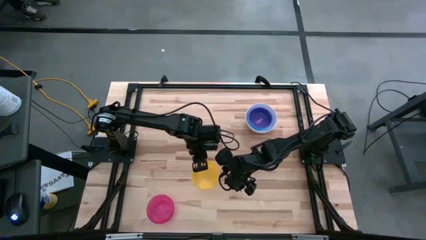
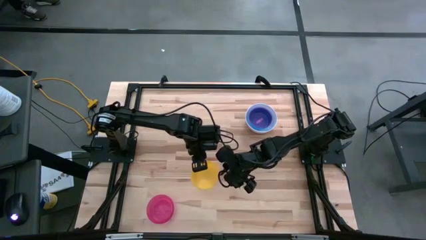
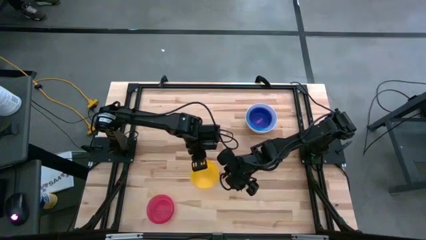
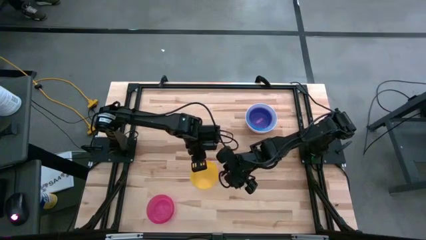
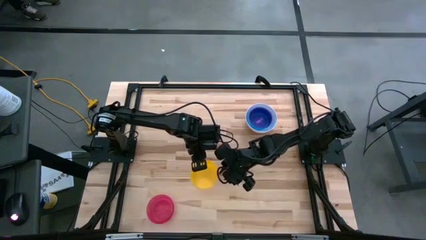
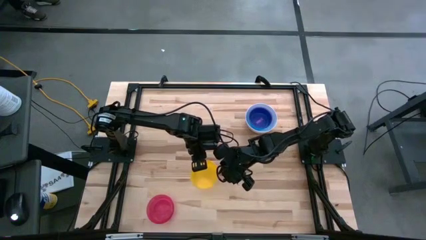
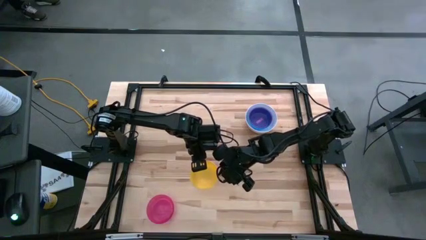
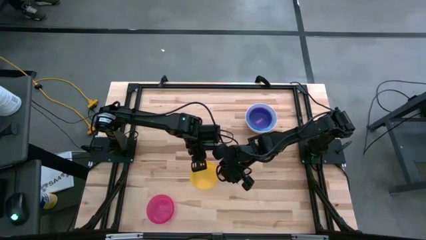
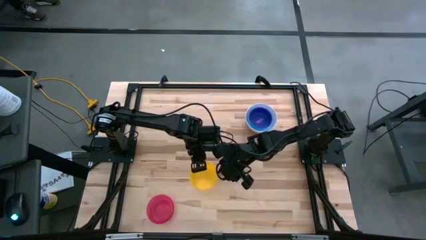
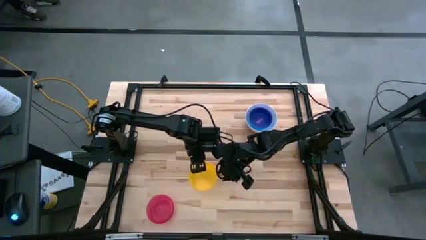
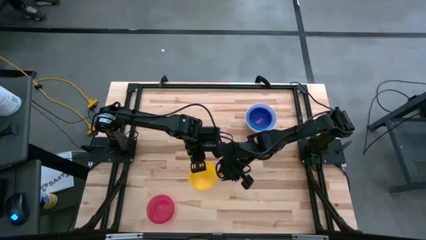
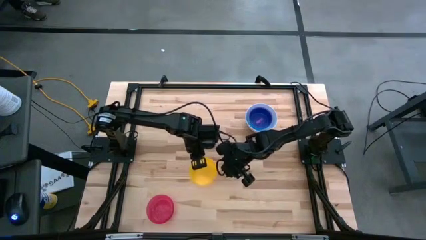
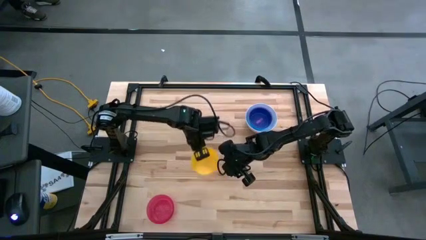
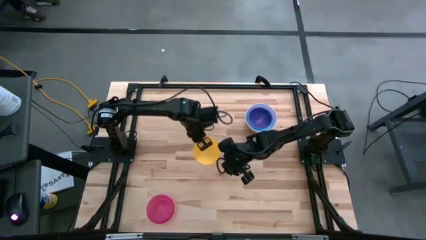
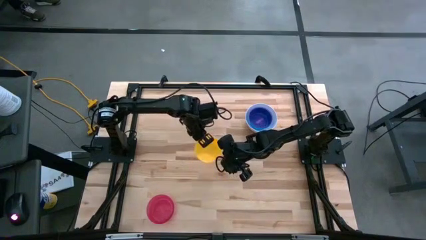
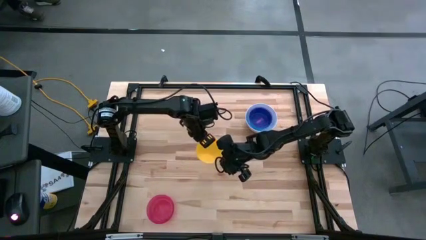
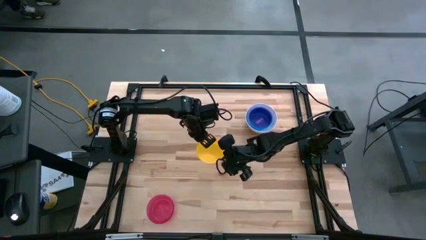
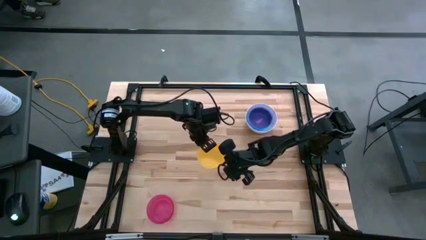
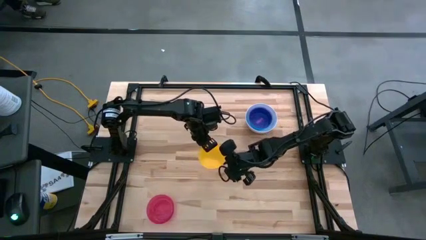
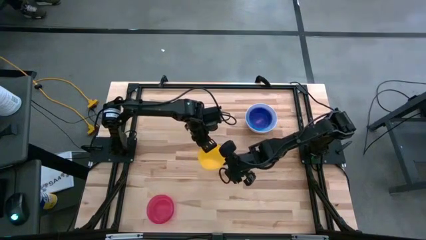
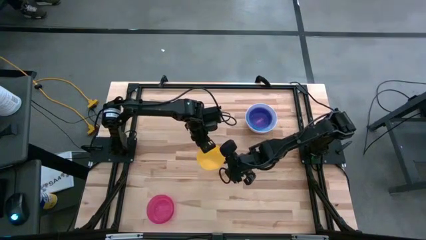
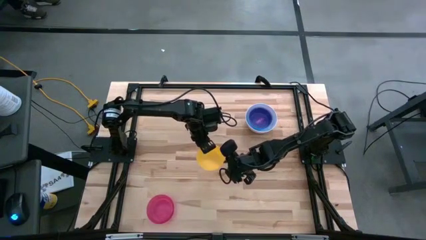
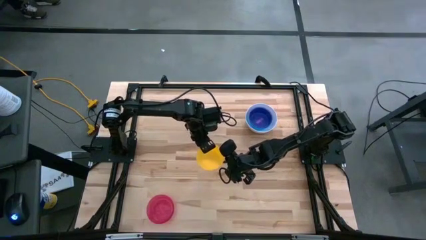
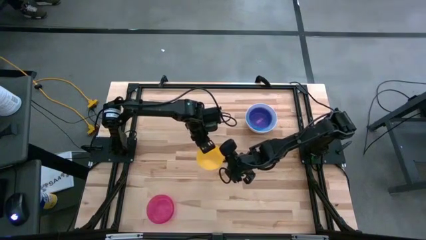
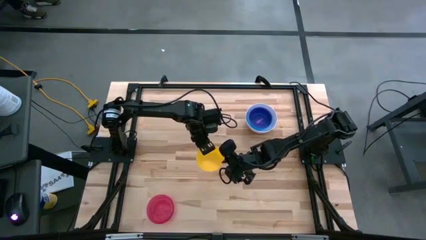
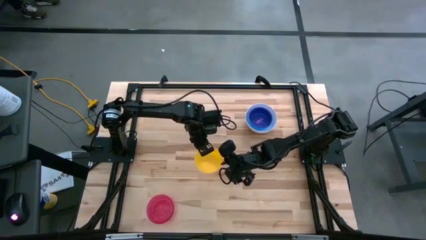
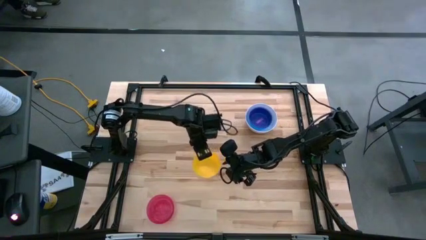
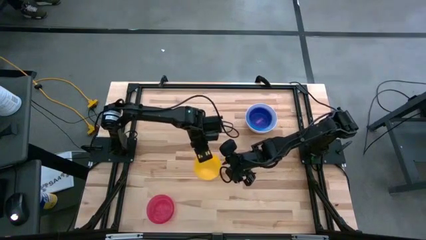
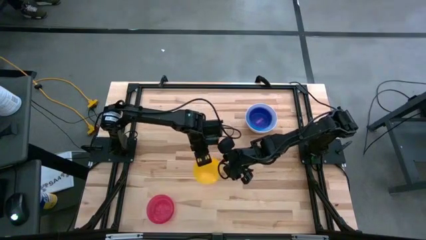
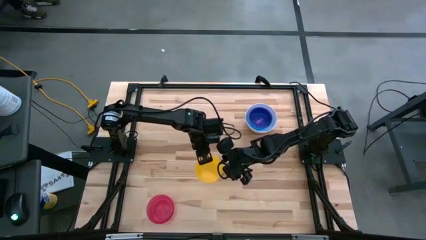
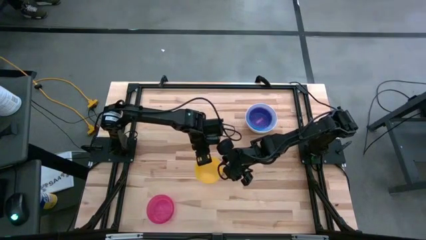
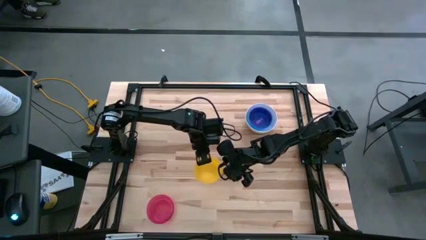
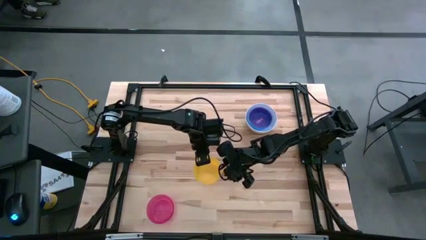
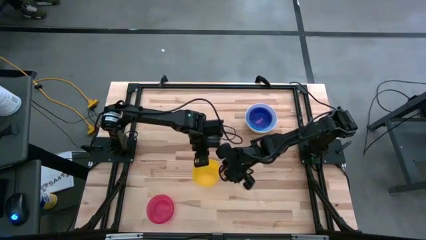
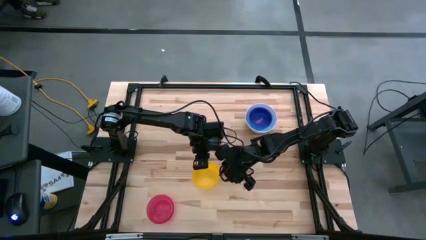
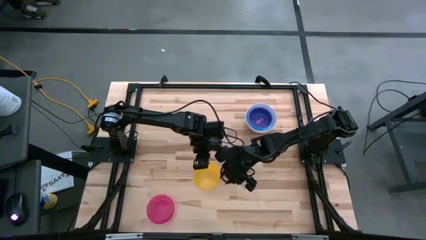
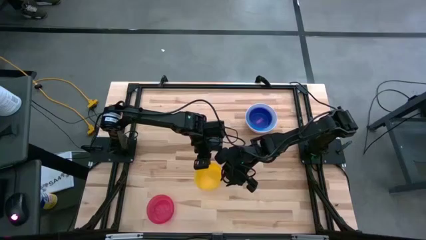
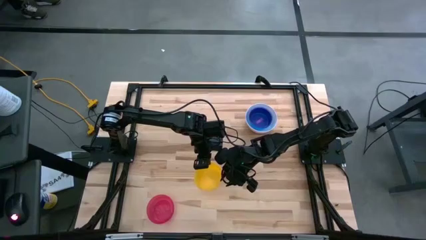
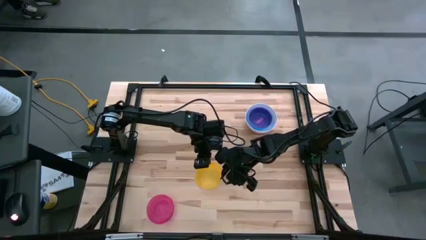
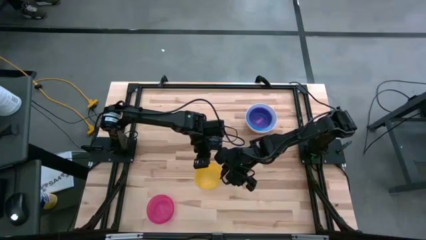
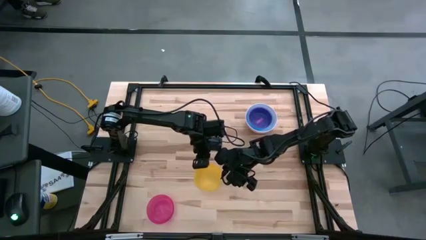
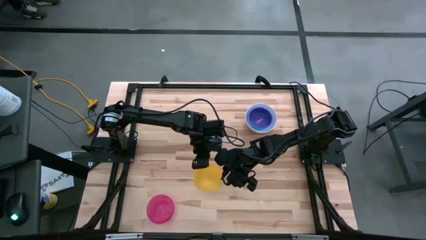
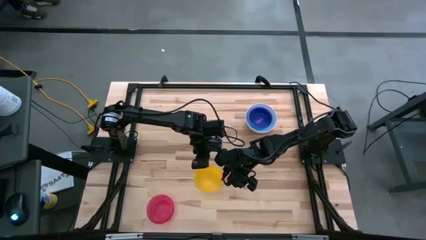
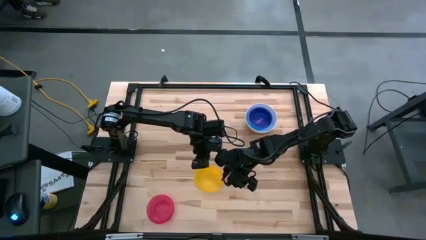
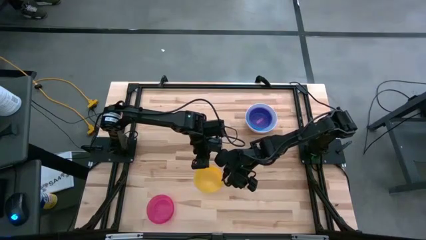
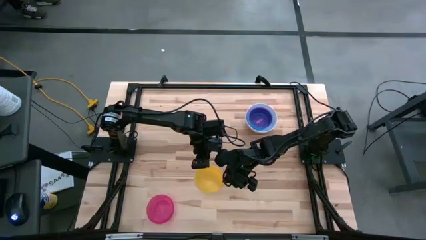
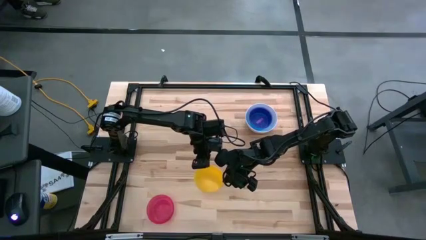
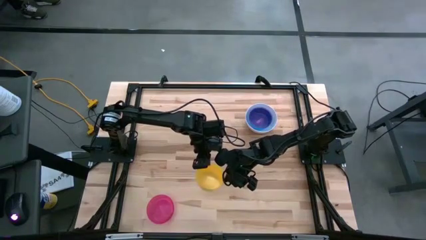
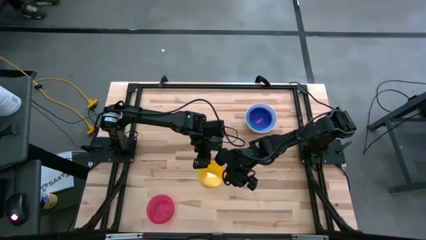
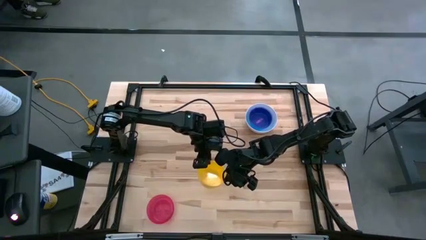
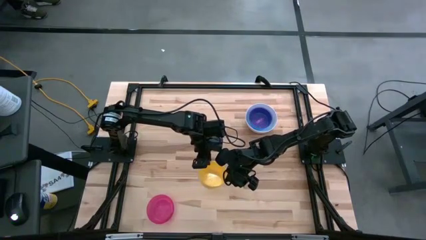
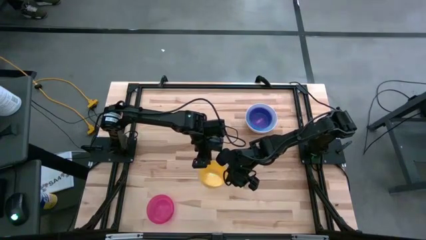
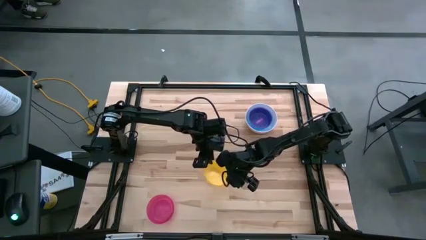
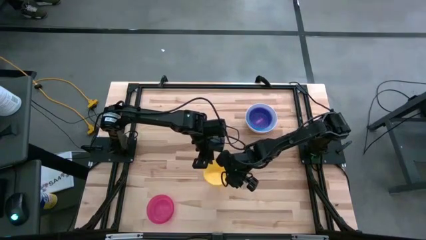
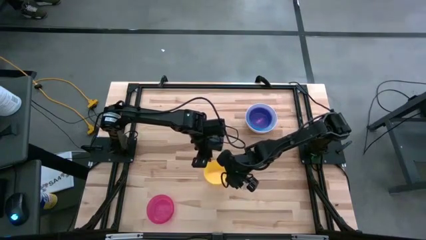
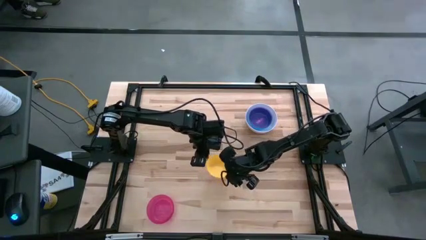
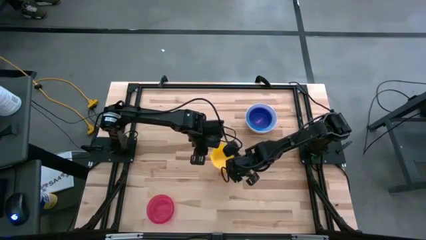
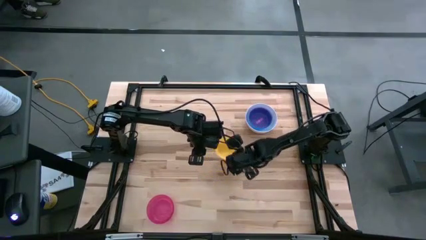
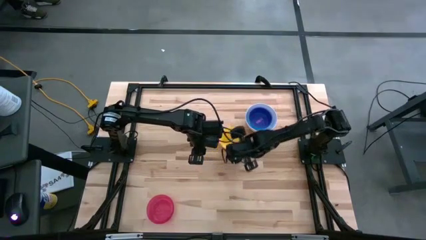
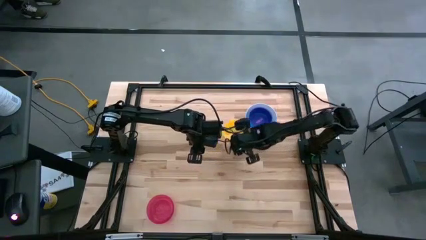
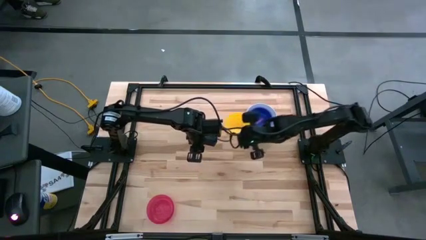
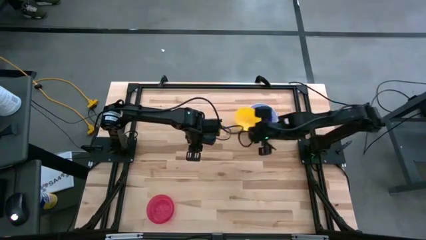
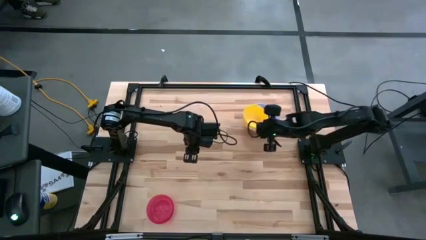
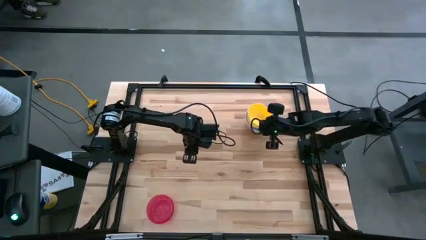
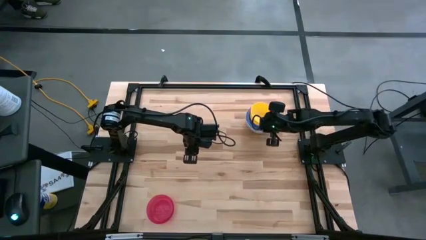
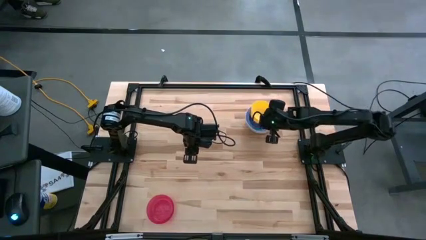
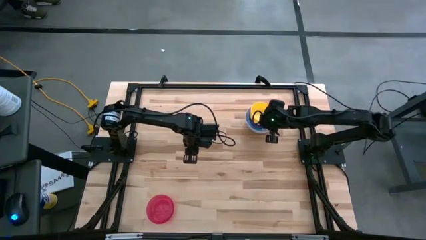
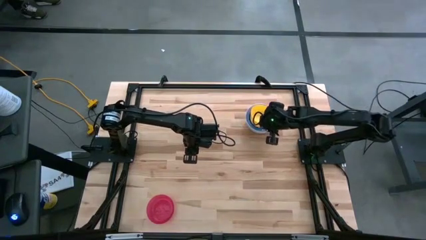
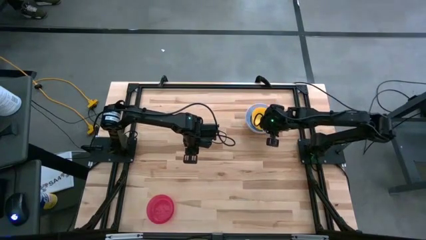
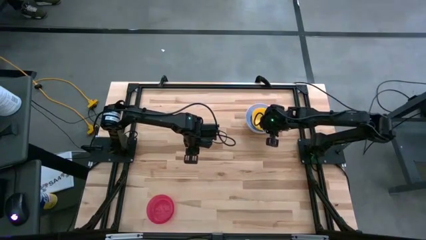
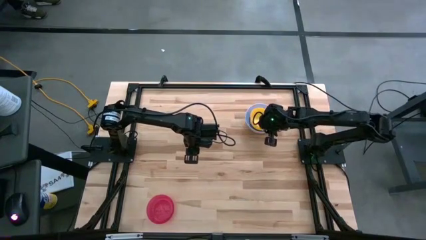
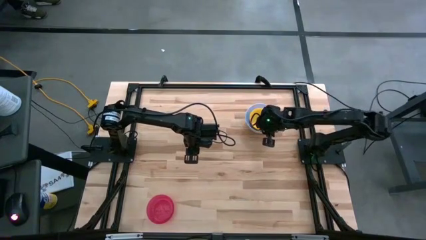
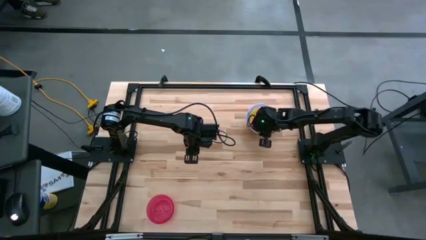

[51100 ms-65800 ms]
Stack the yellow bowl on the purple bowl
